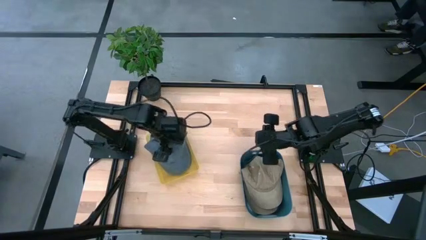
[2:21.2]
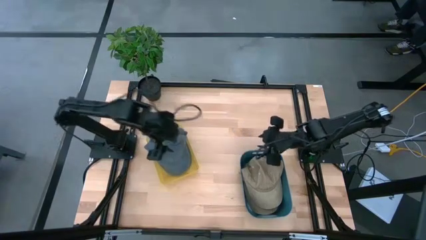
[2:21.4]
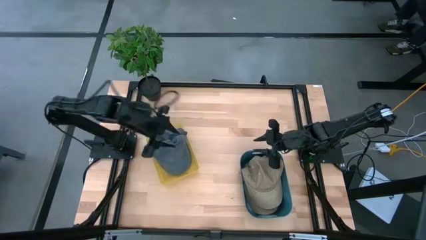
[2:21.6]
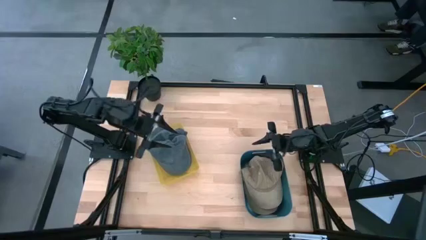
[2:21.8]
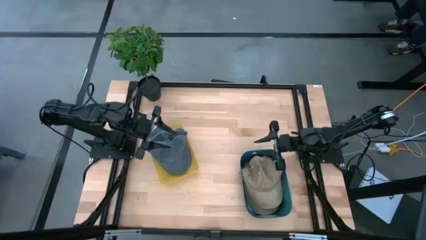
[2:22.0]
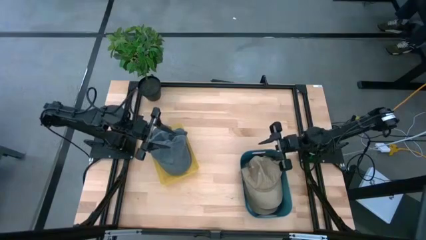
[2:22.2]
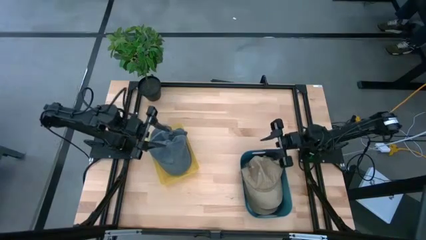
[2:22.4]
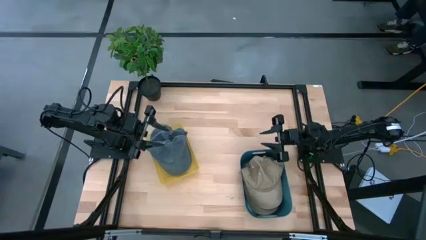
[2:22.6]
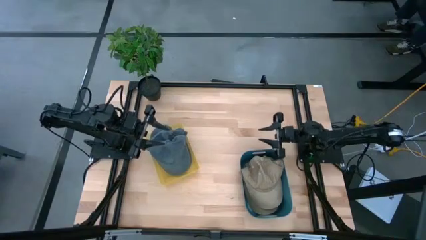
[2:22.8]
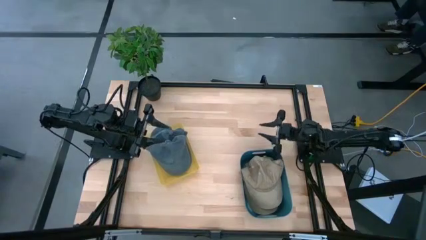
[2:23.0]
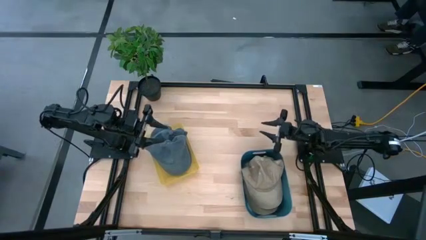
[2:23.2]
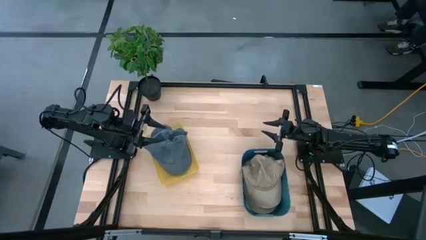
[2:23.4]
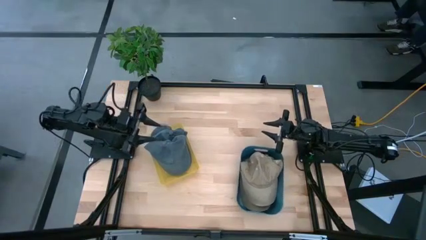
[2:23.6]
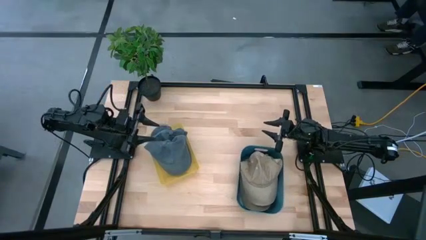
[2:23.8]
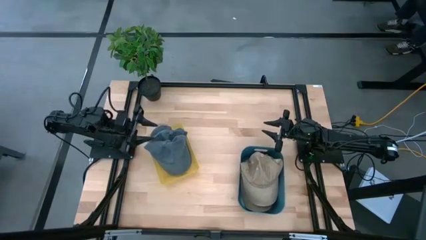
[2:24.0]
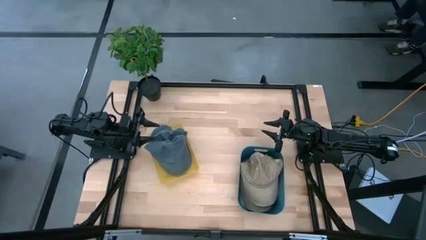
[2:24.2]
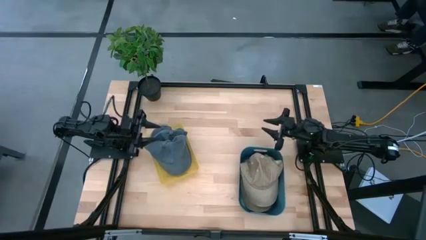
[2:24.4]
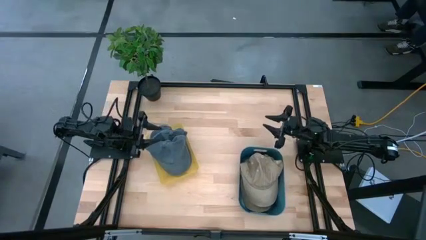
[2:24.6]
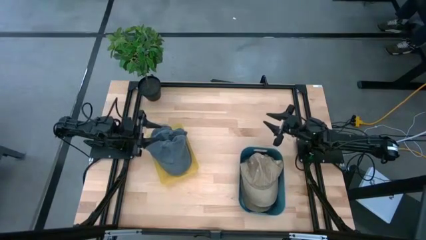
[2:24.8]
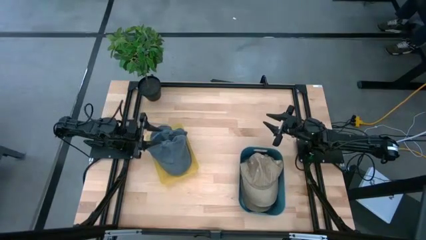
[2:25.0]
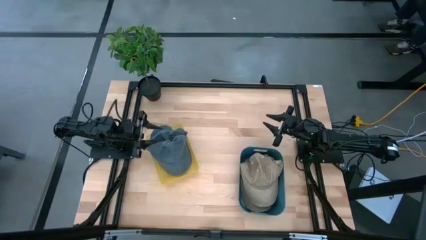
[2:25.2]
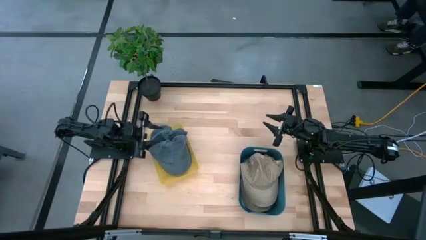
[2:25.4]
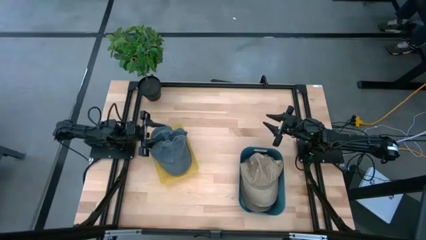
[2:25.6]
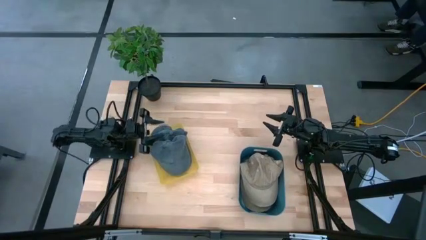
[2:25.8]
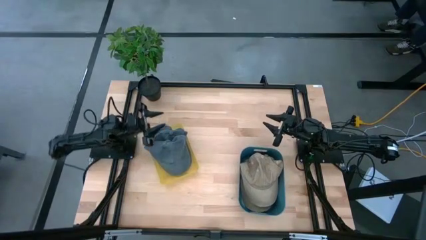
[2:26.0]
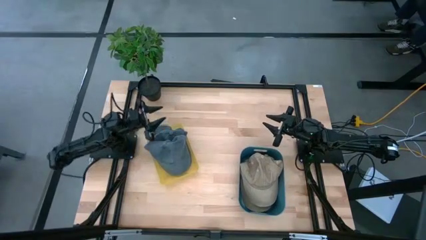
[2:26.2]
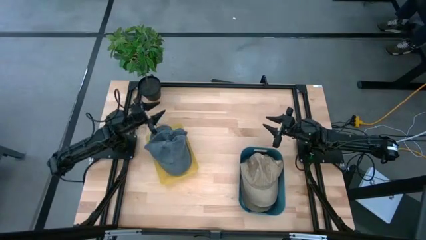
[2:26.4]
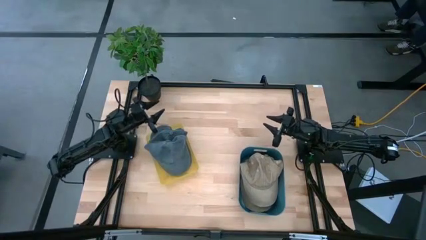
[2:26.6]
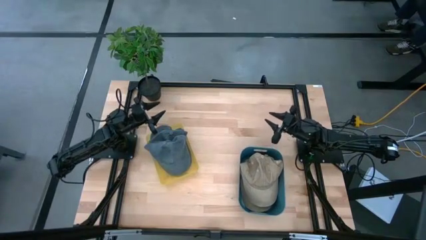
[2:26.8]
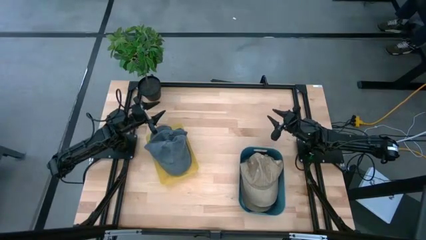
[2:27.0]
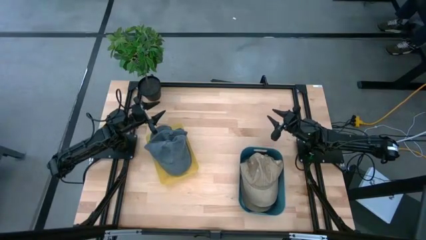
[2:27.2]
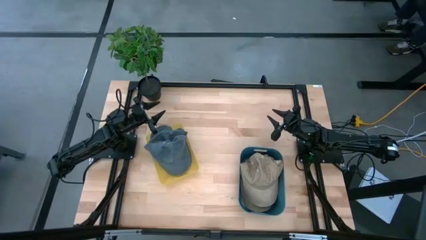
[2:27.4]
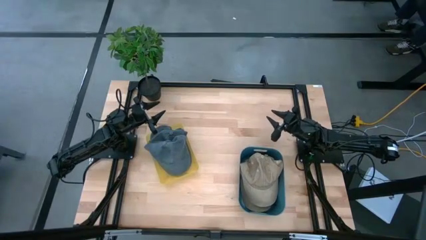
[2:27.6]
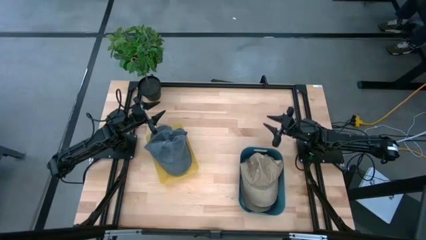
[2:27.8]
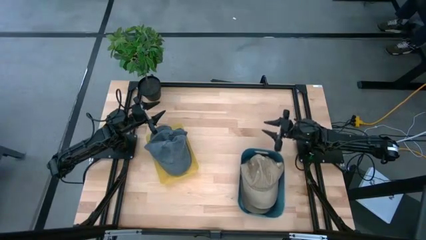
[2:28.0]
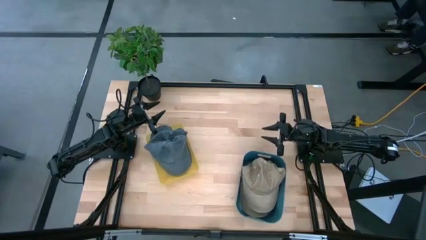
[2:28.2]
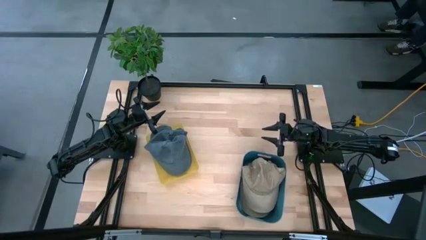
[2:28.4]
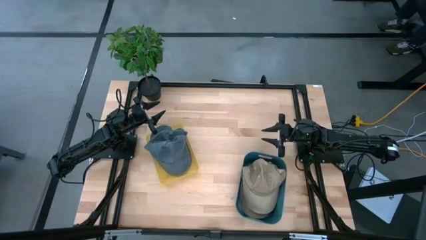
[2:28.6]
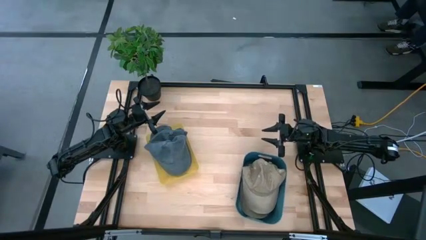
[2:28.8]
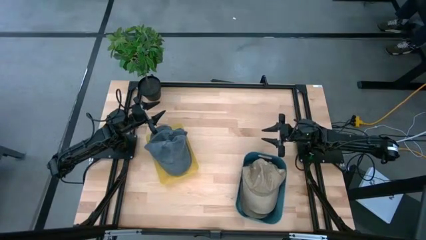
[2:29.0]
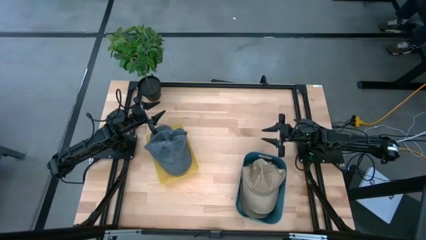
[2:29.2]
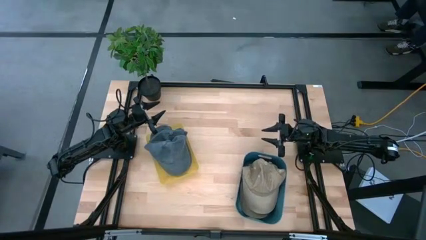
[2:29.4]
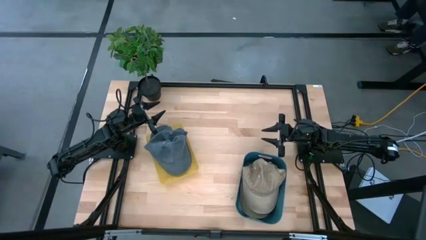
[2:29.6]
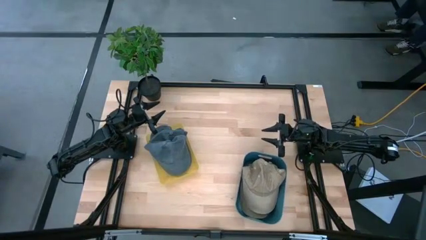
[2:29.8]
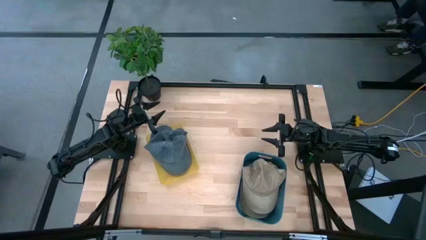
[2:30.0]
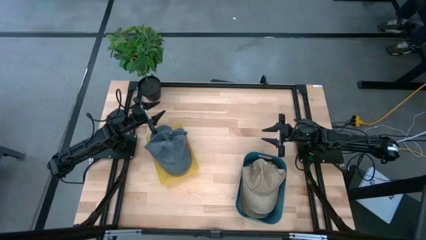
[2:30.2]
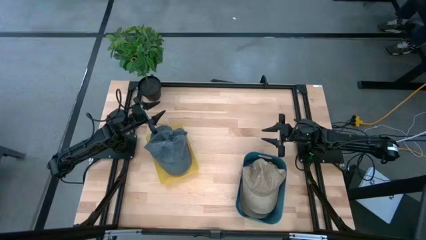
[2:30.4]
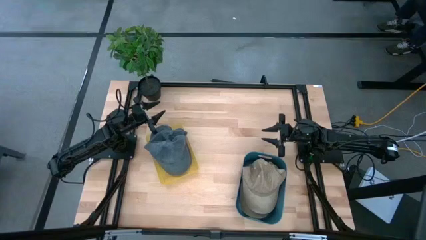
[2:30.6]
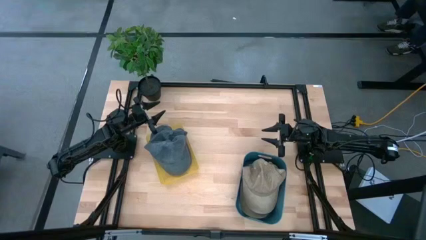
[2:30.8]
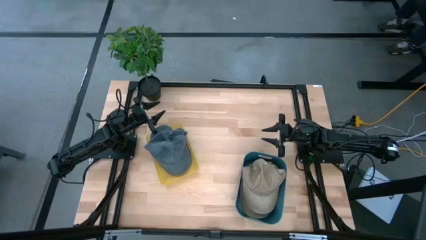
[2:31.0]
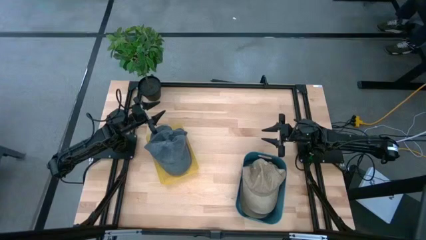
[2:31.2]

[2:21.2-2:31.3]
Task: Pick & Place hat
Return to Home Position

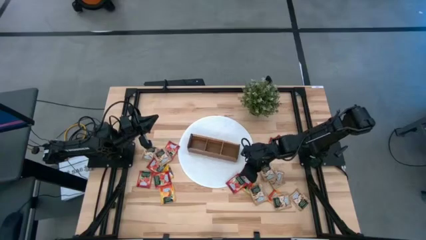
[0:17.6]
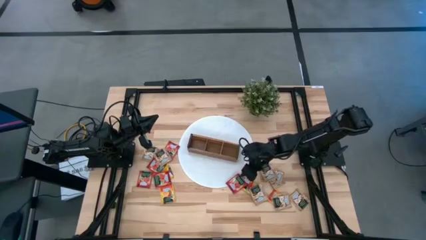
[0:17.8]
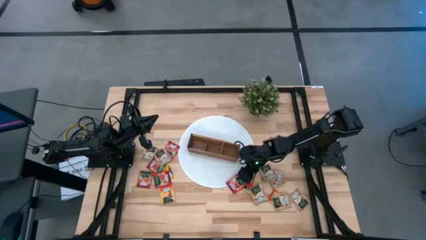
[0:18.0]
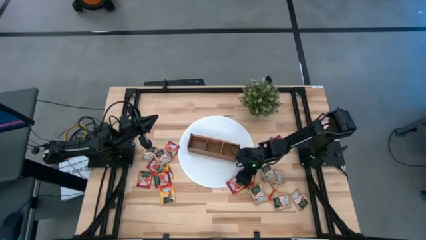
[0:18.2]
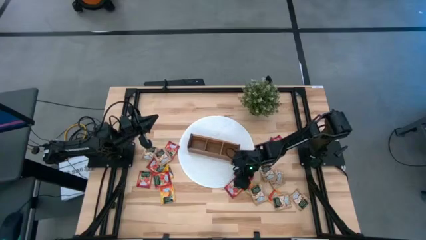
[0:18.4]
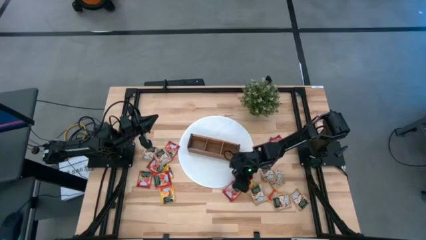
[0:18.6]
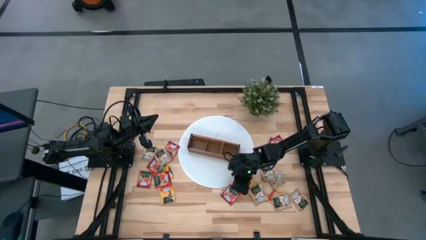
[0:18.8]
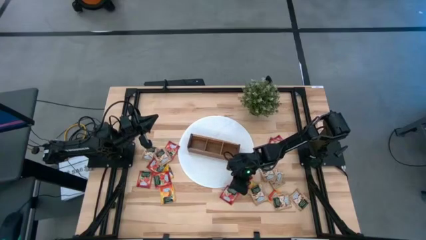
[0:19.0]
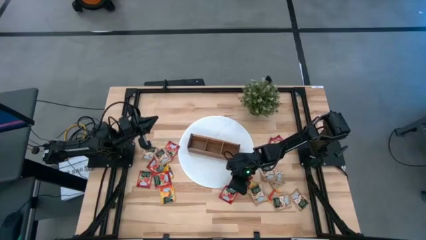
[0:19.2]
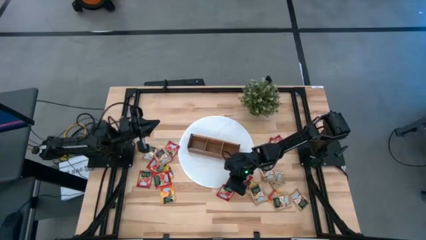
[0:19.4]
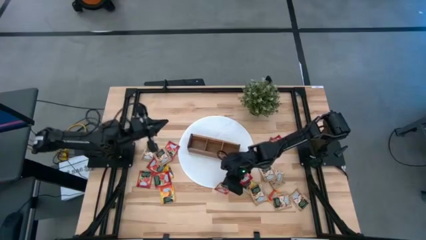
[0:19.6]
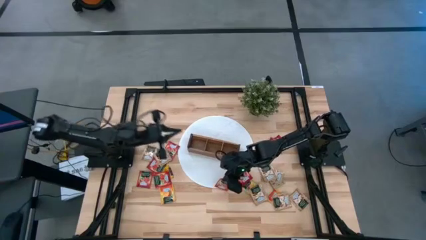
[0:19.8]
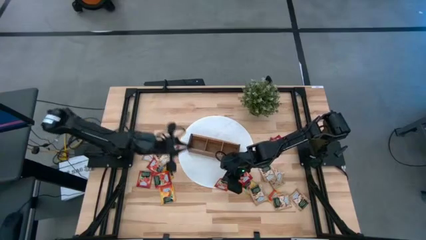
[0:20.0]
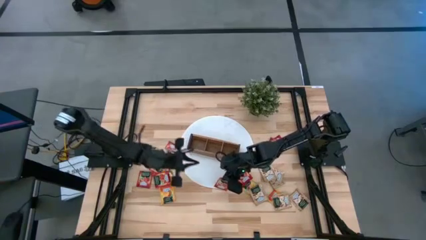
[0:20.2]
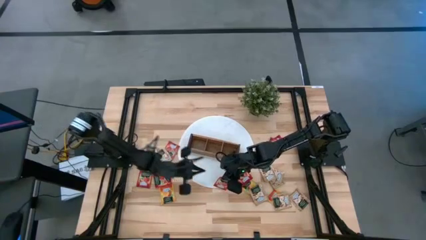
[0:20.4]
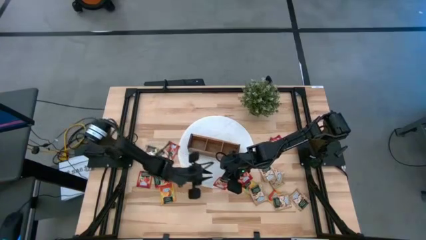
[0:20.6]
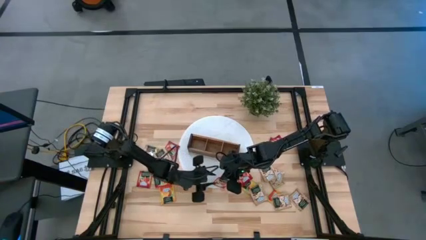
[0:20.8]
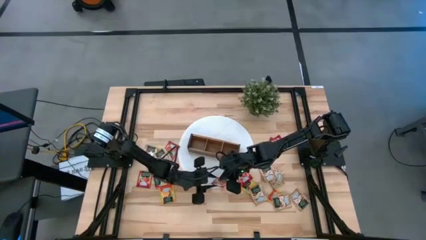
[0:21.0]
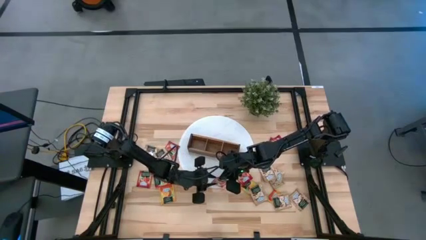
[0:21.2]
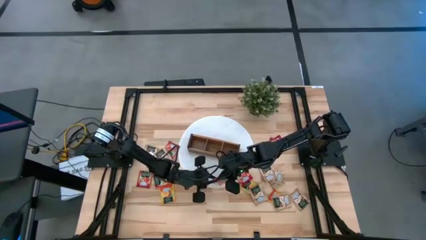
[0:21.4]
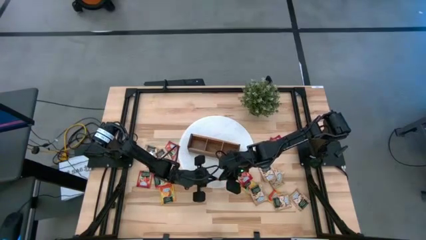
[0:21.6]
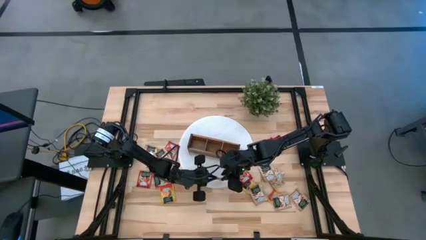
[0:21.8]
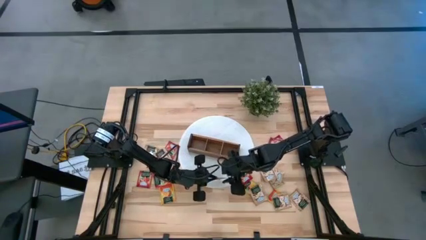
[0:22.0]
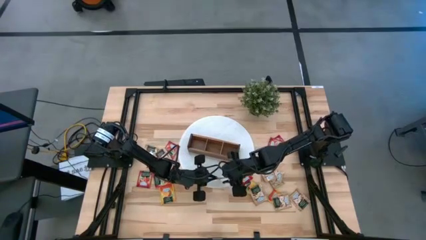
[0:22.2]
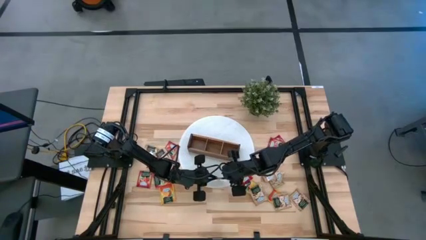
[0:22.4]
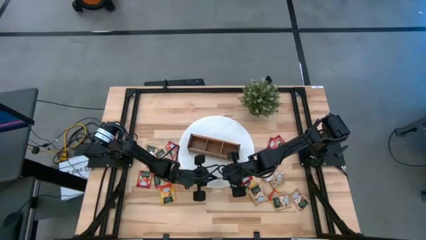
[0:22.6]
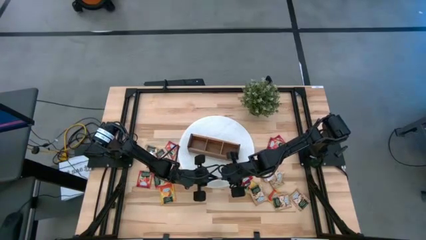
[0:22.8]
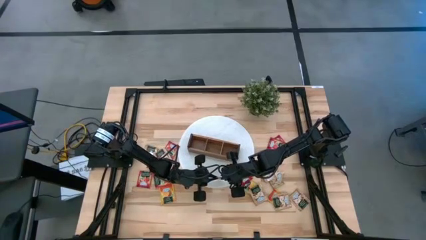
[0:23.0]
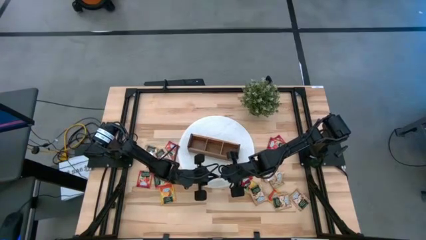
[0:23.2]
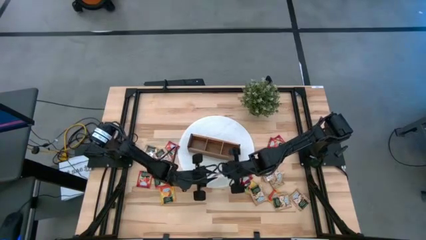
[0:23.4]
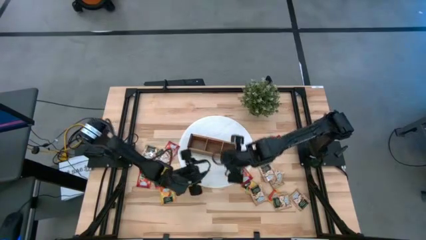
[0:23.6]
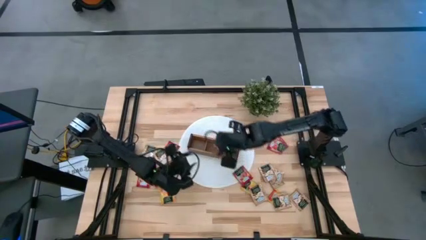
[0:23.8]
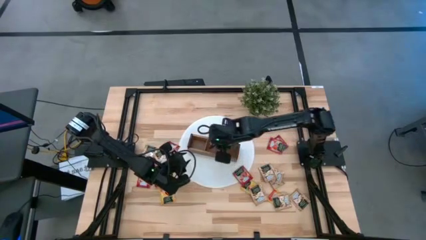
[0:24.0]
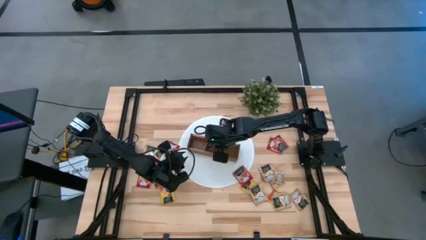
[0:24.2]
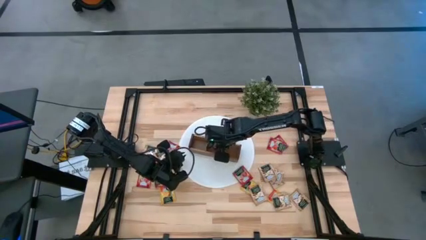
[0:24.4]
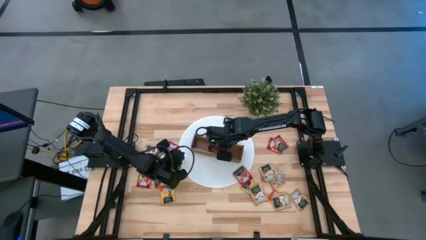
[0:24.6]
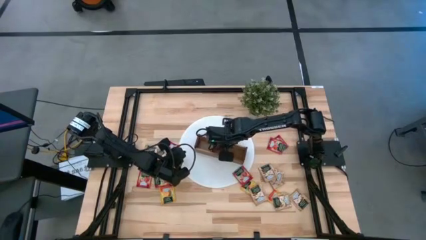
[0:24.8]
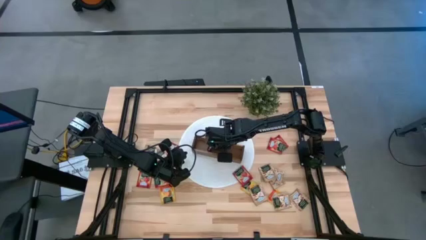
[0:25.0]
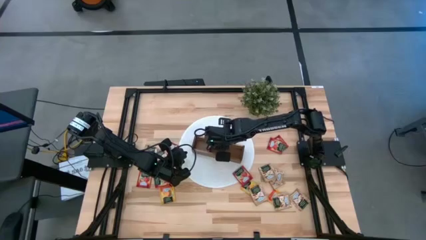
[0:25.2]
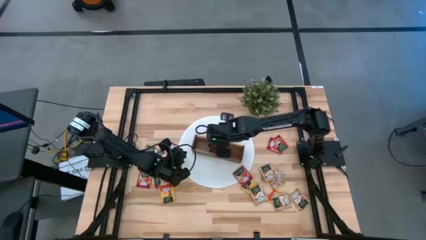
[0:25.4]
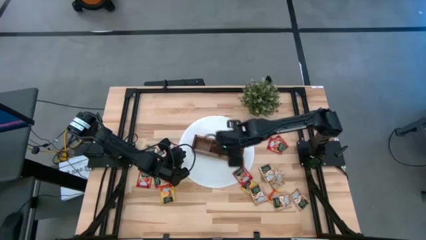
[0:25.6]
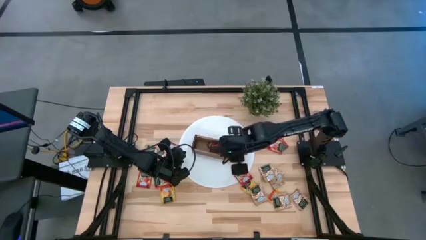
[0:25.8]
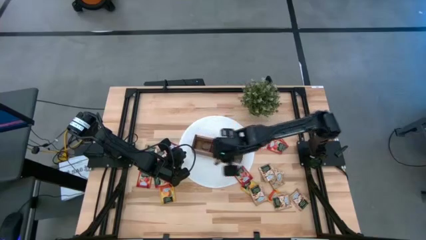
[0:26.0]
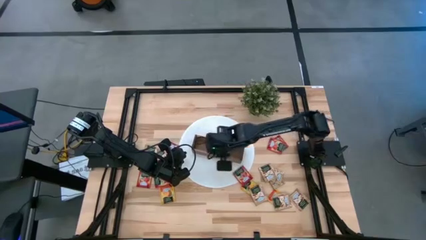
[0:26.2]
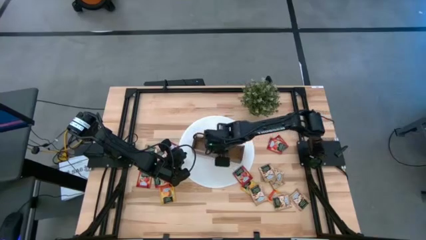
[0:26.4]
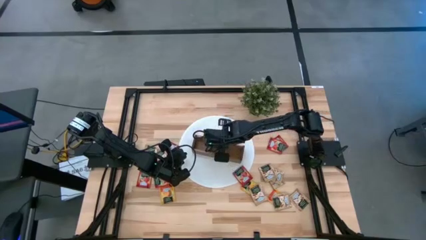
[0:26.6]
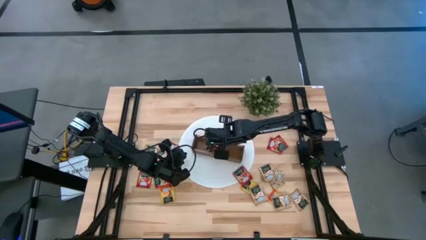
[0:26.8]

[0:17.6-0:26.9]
Task: Pick & Place Tea
Put the red tea bag into the middle section of the wooden organizer
